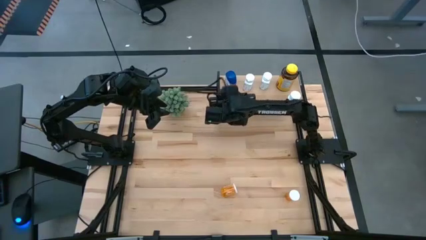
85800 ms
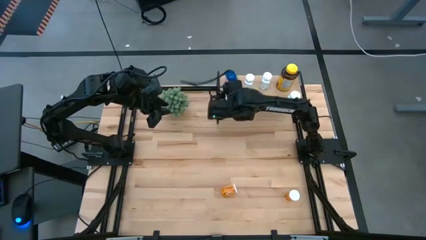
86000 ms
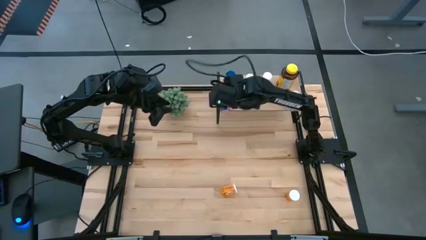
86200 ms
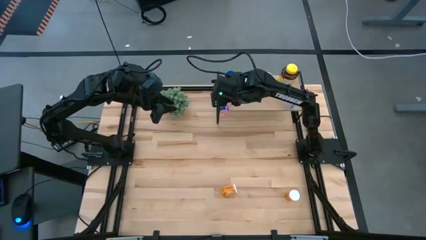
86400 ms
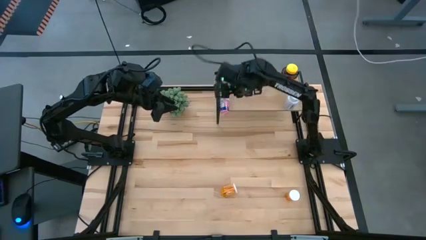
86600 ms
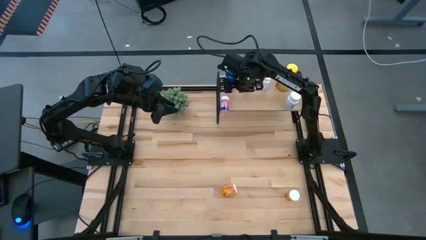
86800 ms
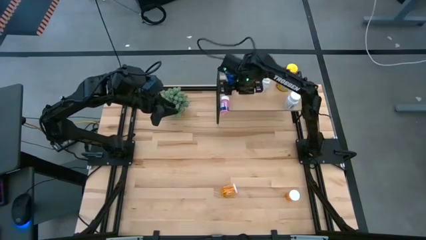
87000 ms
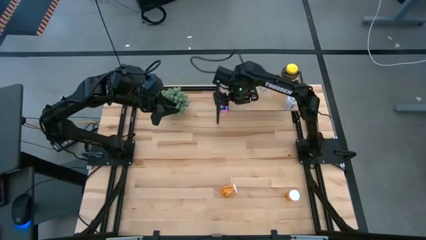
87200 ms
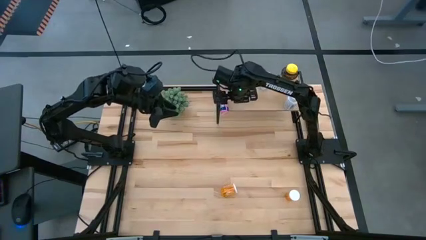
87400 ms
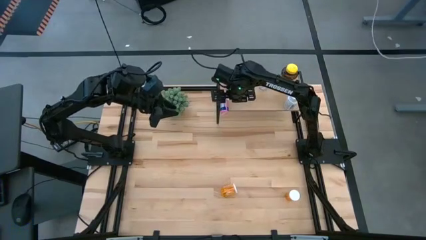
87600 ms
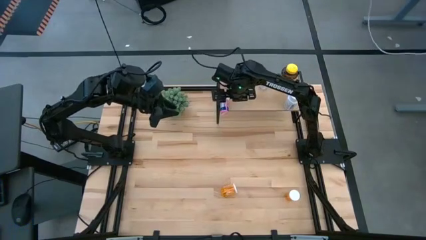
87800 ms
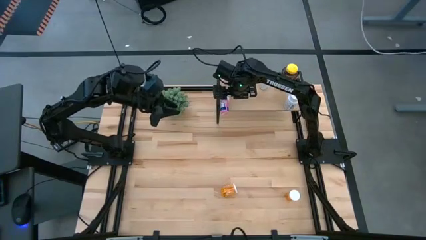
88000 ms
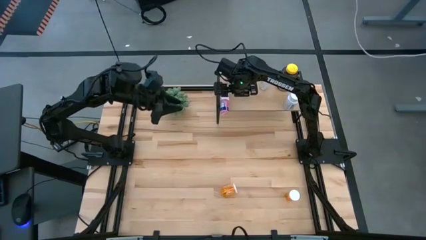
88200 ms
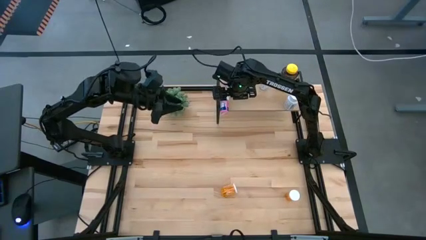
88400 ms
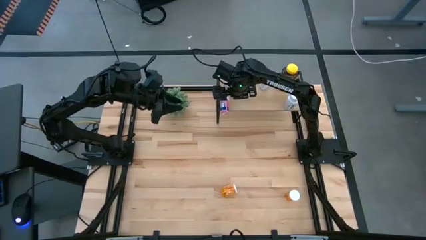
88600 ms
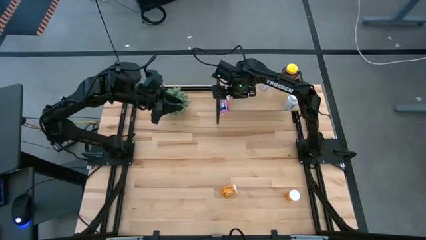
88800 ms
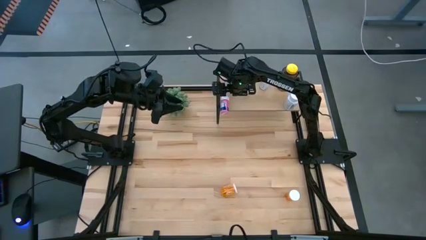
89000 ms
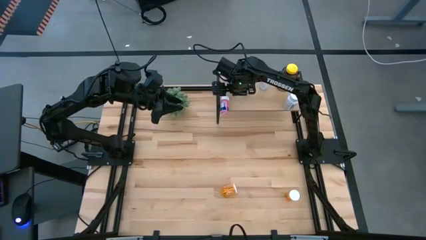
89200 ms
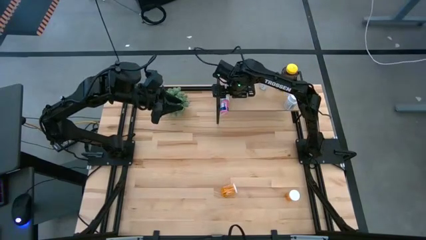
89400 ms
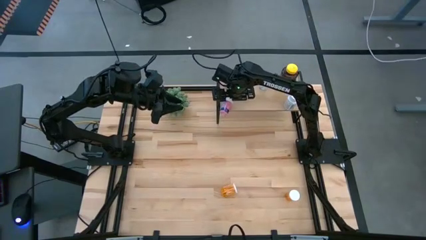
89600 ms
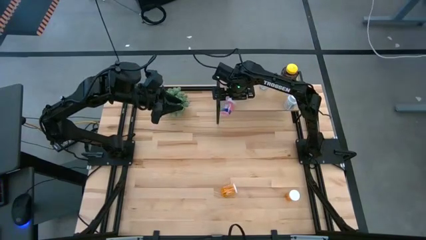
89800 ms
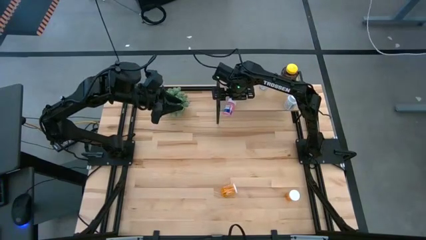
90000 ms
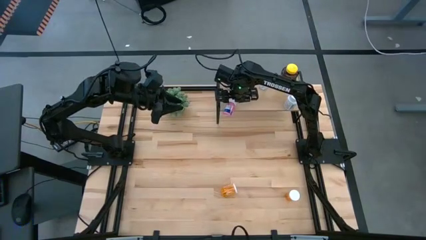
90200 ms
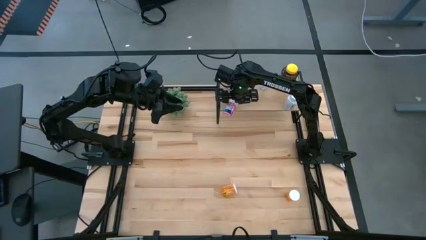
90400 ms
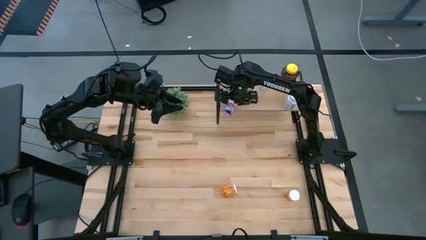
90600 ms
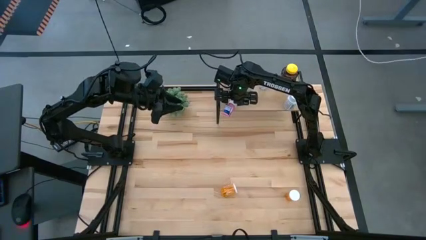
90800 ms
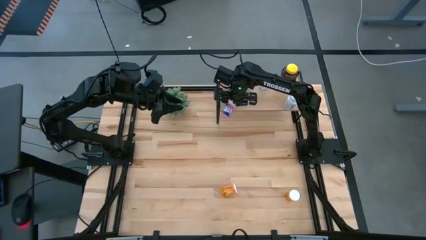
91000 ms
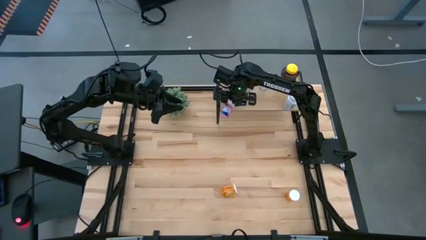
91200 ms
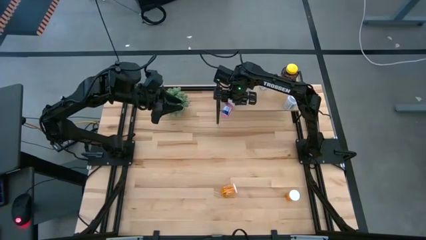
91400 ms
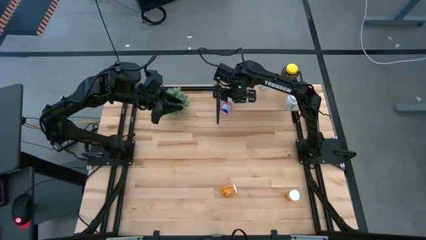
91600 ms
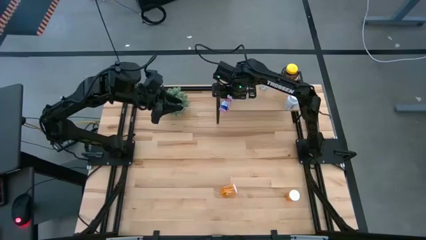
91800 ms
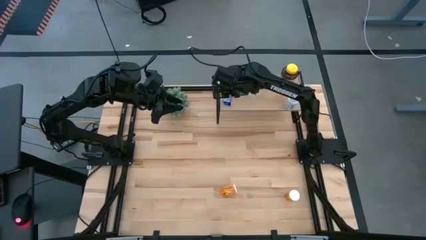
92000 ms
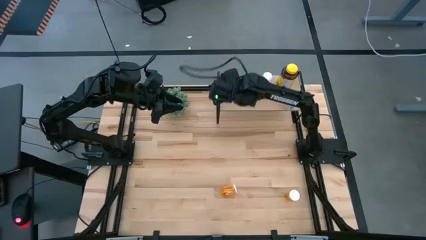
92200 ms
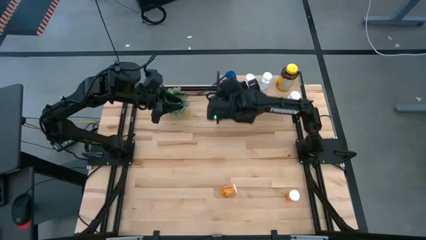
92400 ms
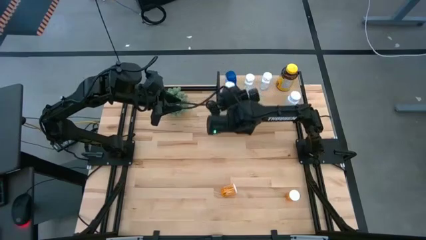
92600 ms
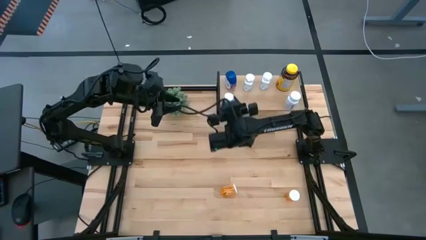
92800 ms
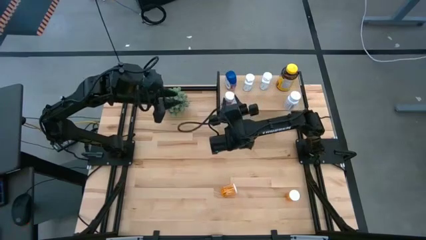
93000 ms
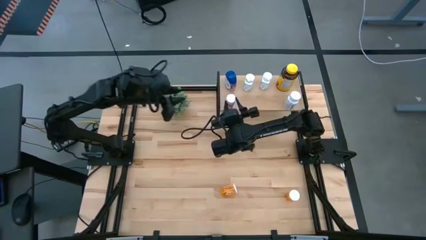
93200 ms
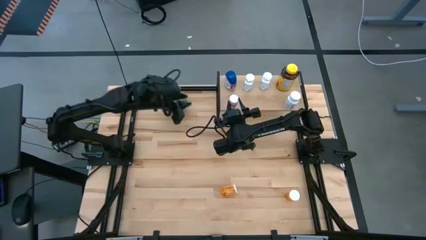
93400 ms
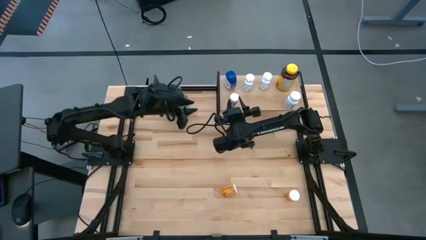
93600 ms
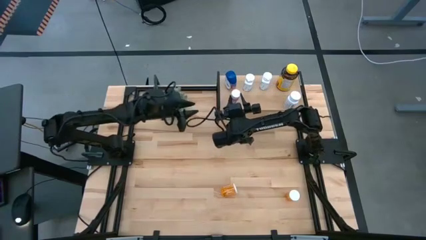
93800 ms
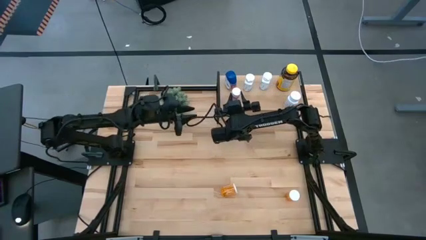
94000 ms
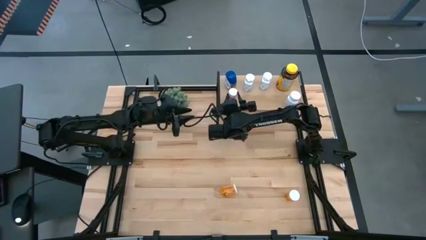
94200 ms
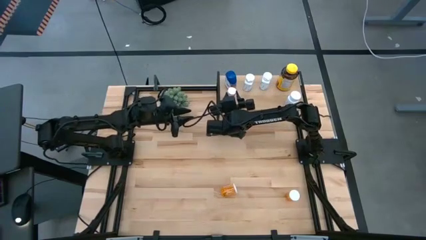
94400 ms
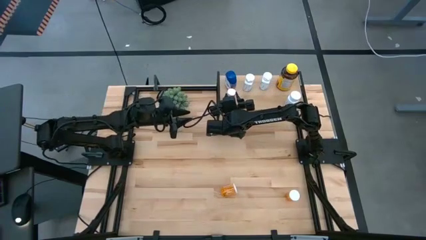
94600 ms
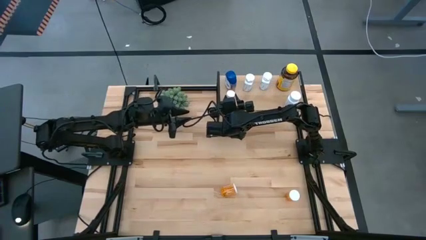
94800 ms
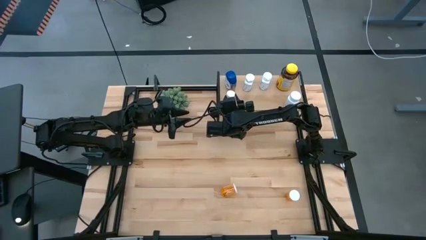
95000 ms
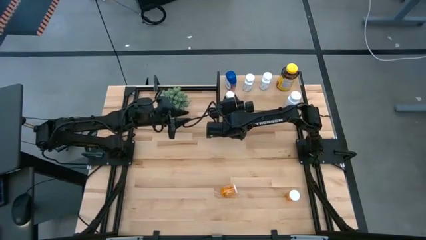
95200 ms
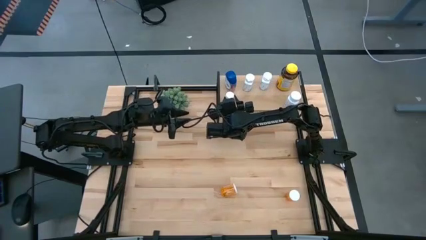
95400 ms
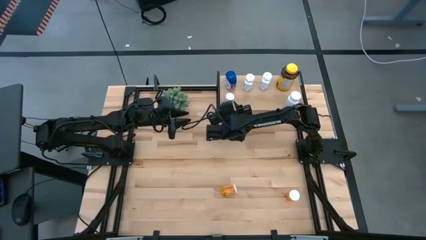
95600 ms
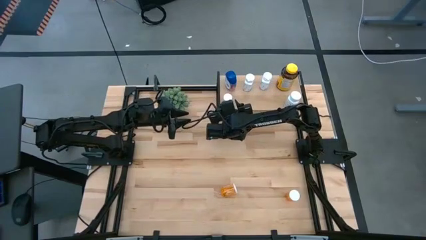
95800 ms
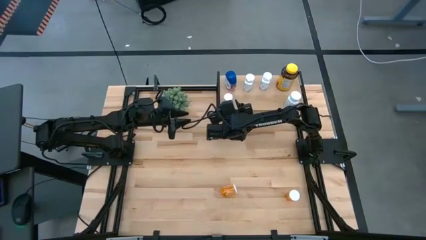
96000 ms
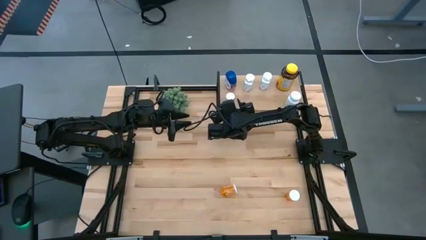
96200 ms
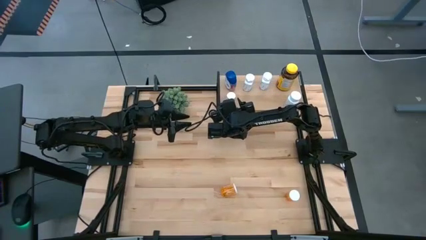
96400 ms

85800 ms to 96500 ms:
Task: Pick and place medicine bottles onto shelf by color
Put the pink medicine bottle on the shelf
